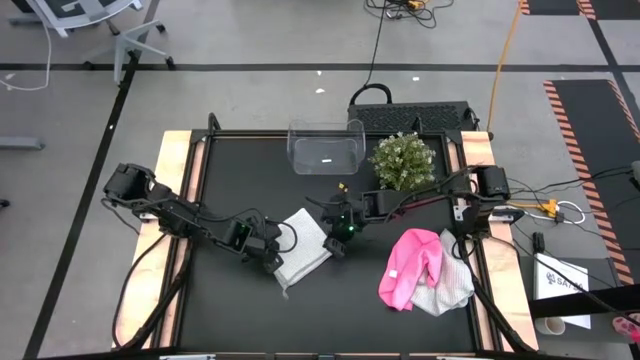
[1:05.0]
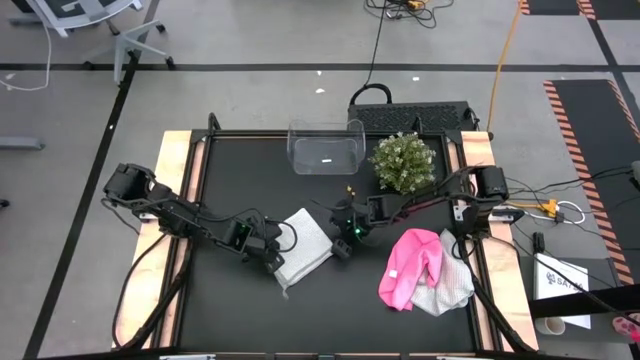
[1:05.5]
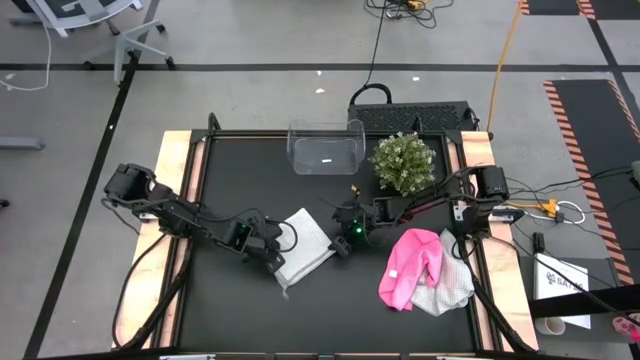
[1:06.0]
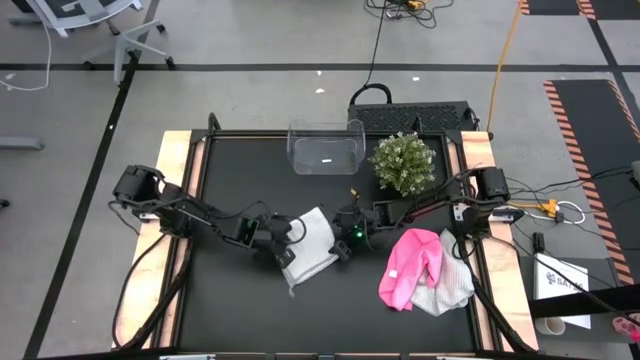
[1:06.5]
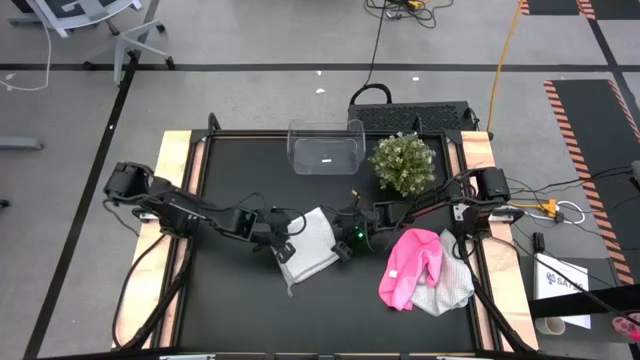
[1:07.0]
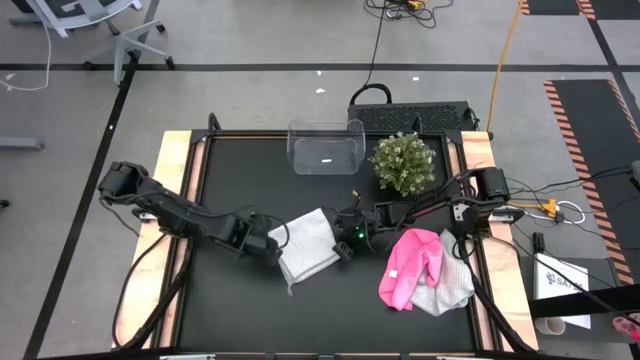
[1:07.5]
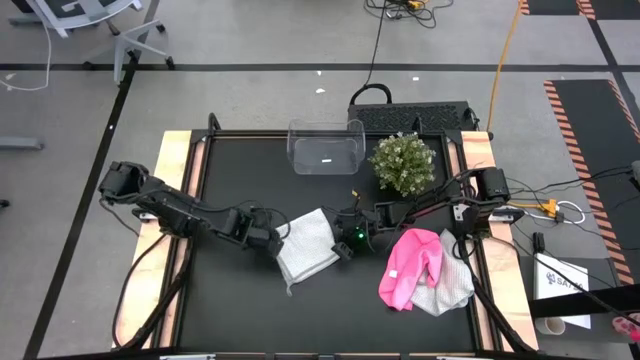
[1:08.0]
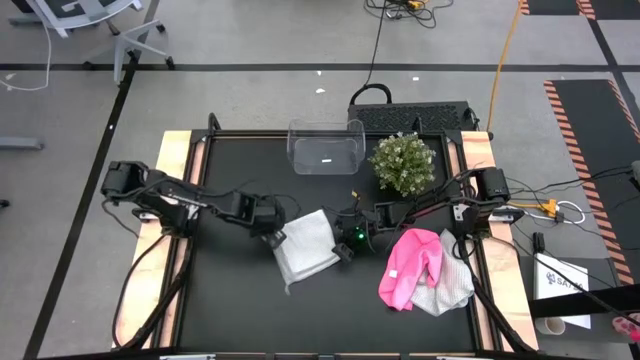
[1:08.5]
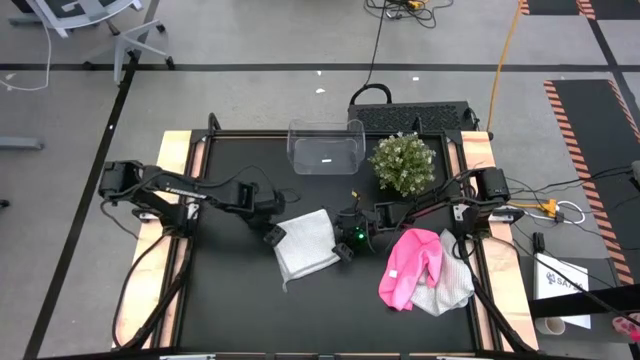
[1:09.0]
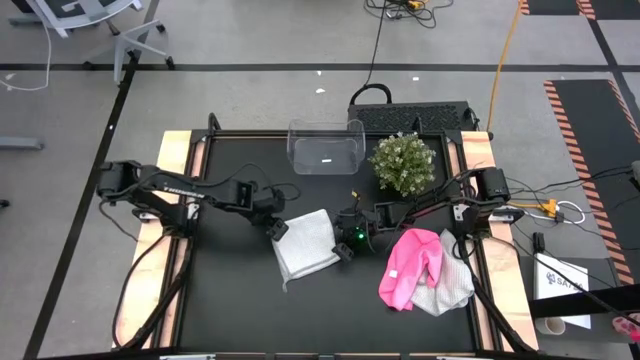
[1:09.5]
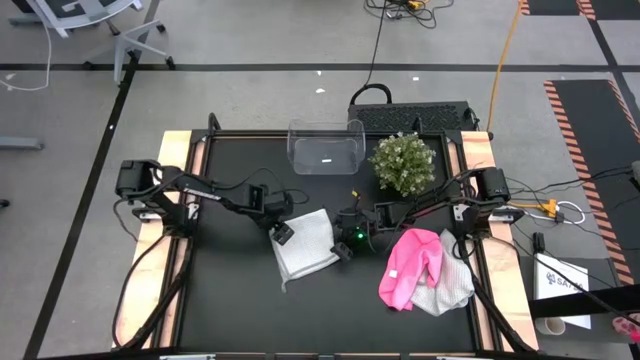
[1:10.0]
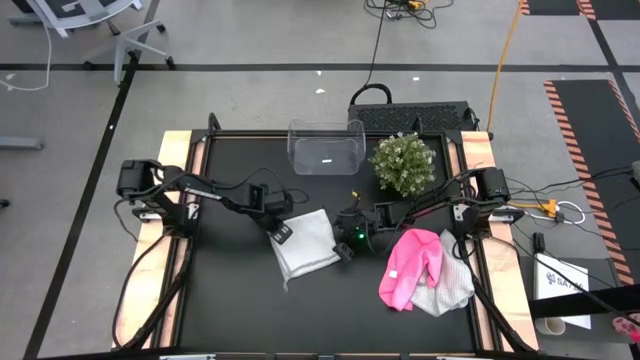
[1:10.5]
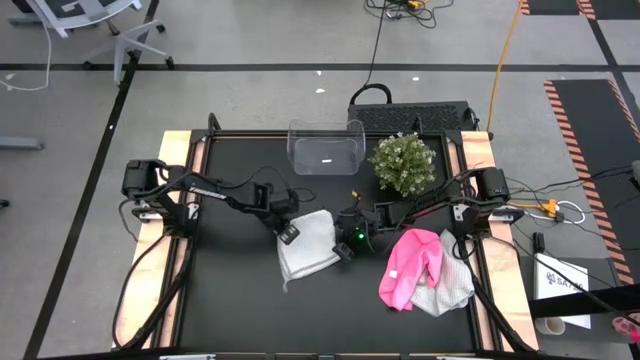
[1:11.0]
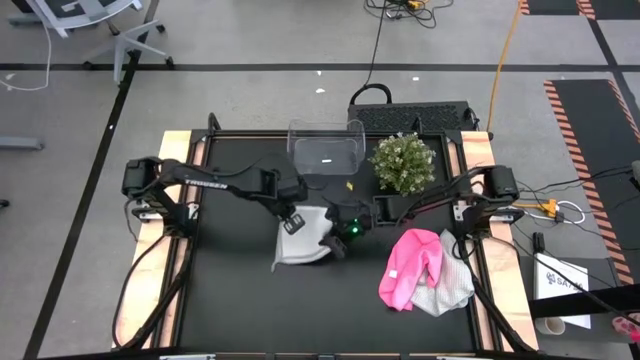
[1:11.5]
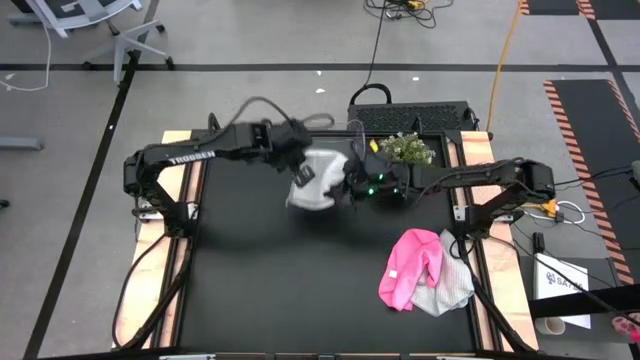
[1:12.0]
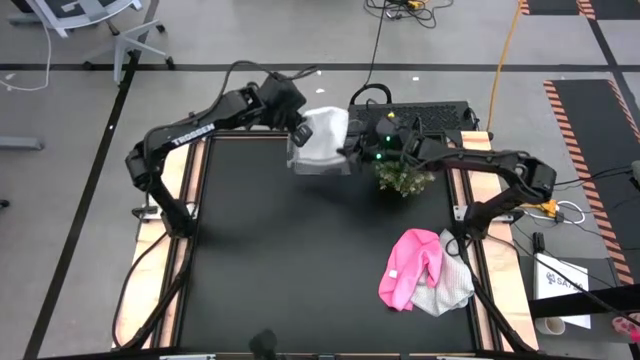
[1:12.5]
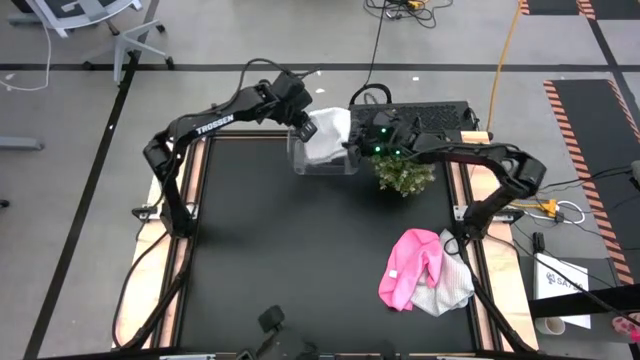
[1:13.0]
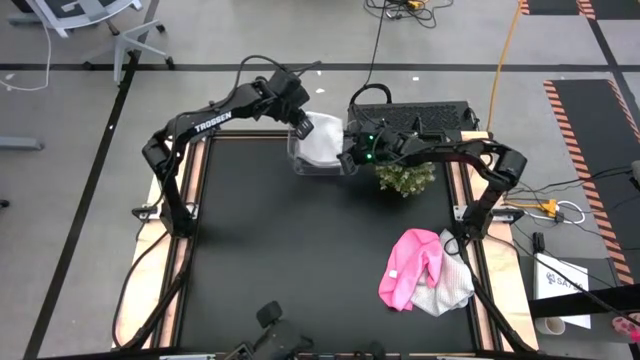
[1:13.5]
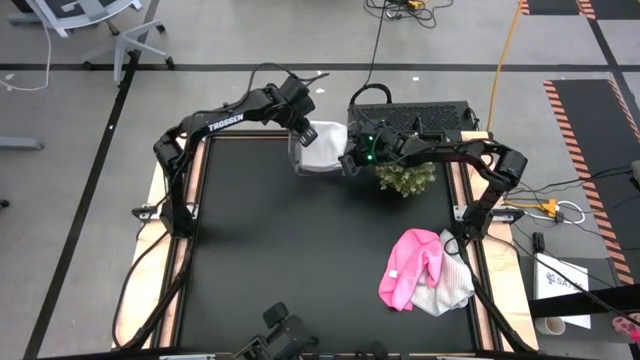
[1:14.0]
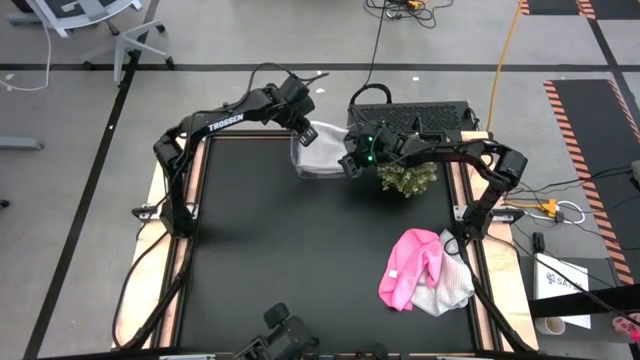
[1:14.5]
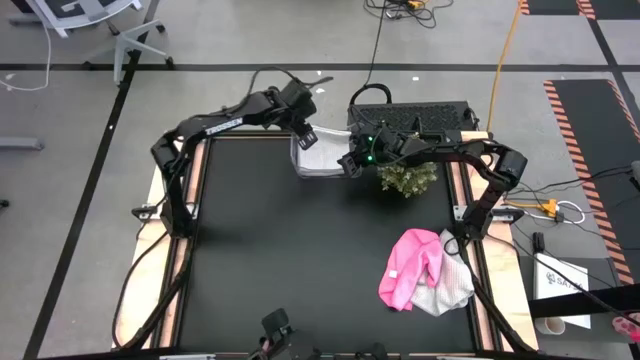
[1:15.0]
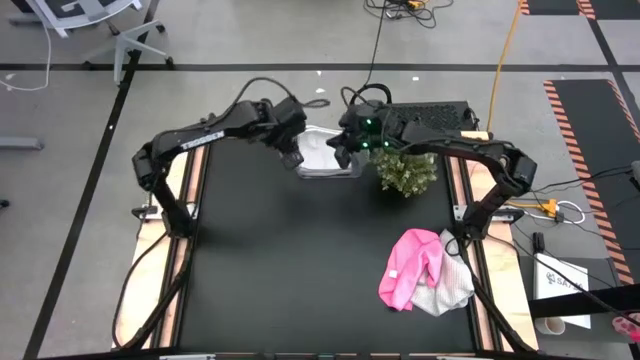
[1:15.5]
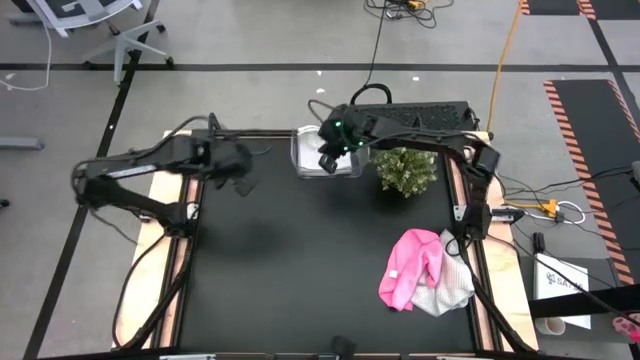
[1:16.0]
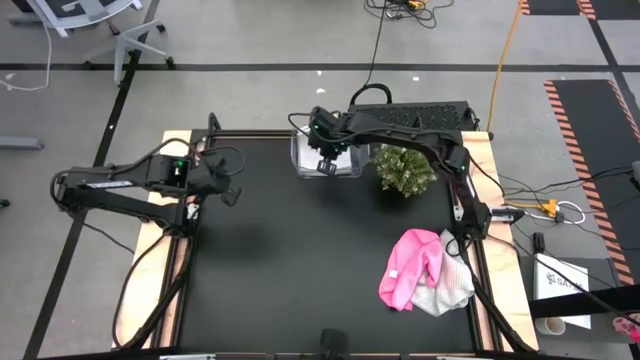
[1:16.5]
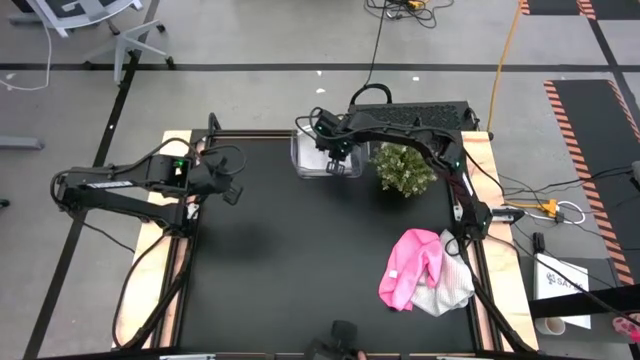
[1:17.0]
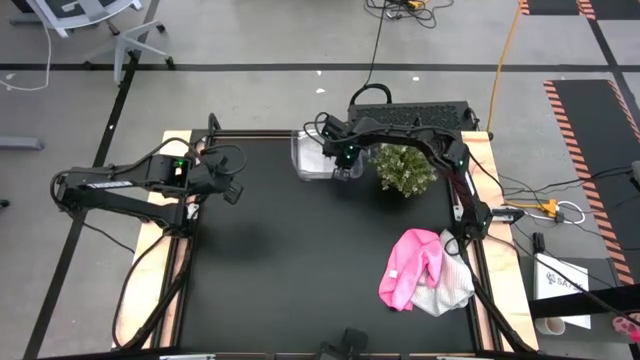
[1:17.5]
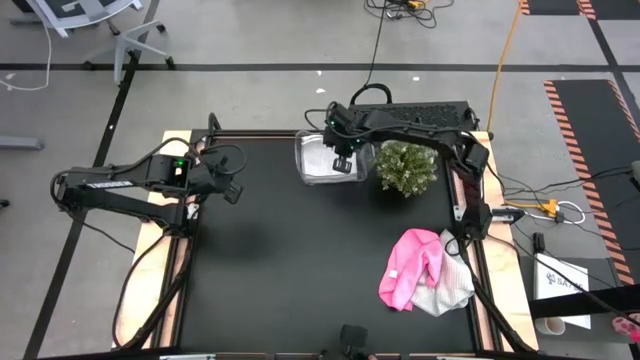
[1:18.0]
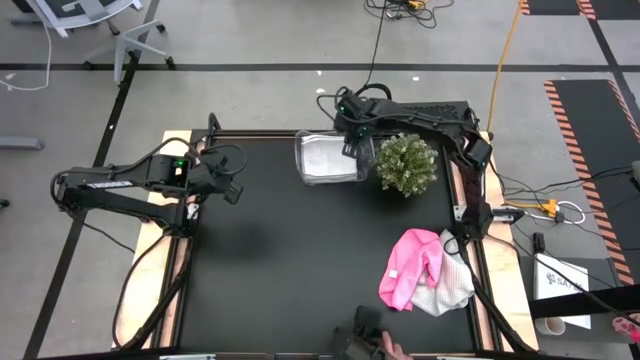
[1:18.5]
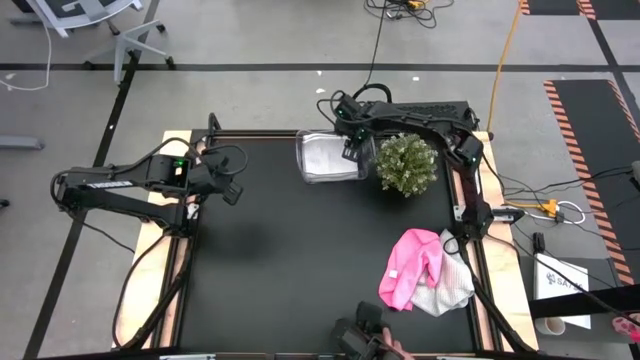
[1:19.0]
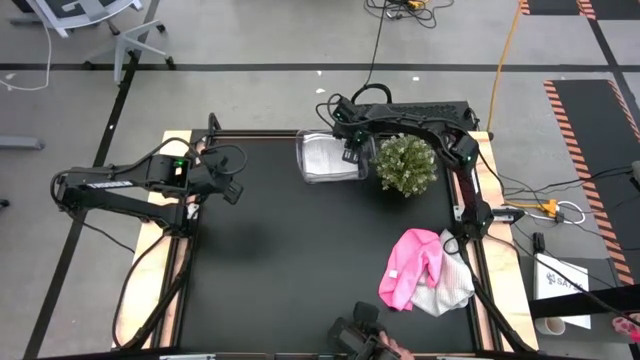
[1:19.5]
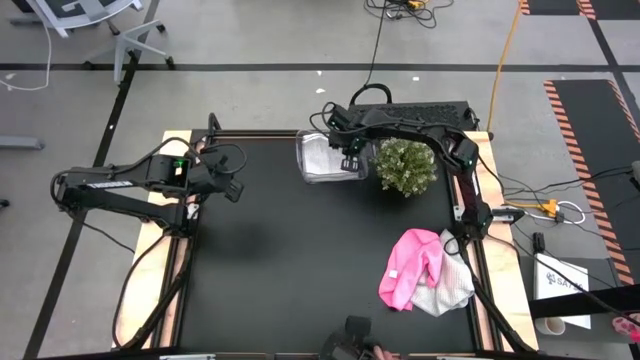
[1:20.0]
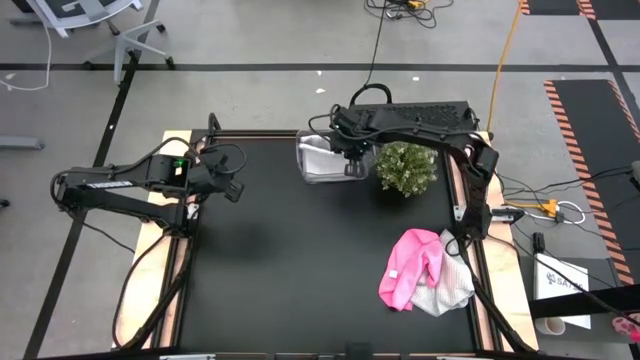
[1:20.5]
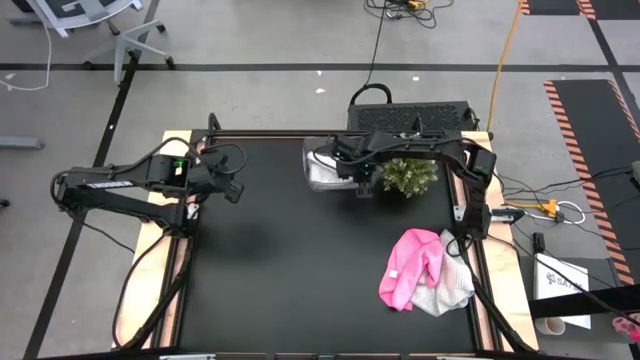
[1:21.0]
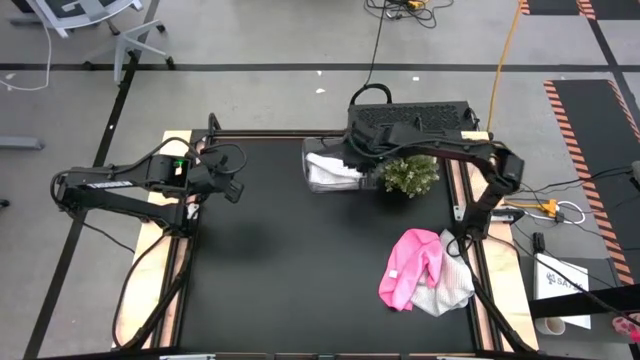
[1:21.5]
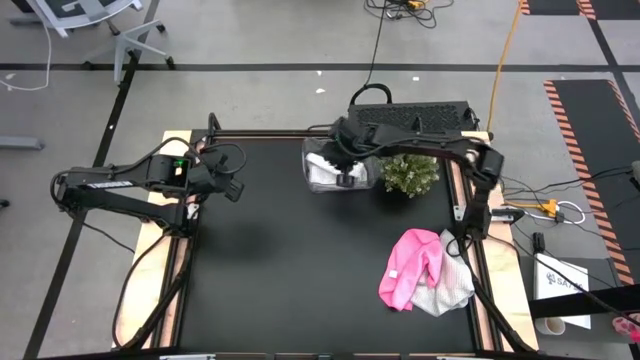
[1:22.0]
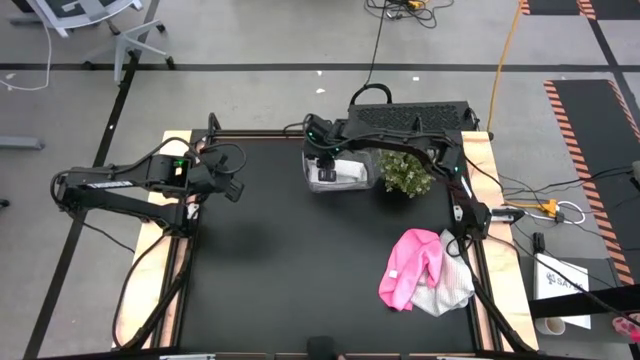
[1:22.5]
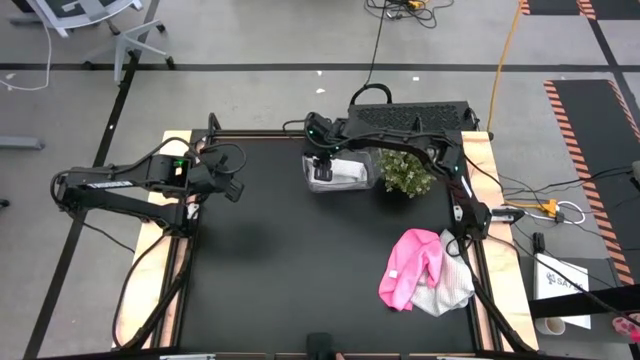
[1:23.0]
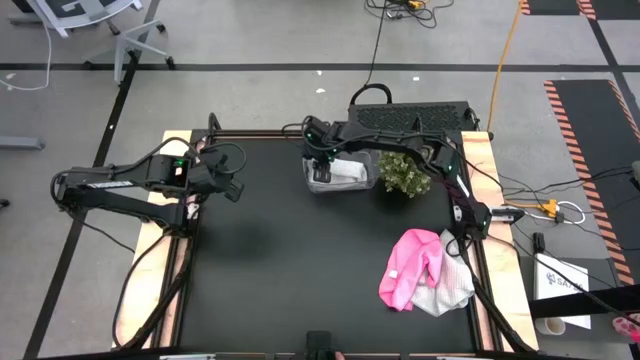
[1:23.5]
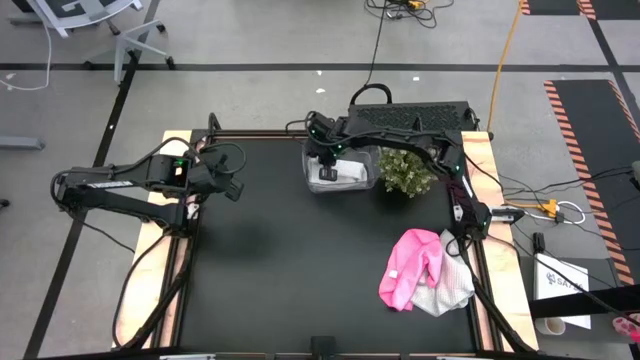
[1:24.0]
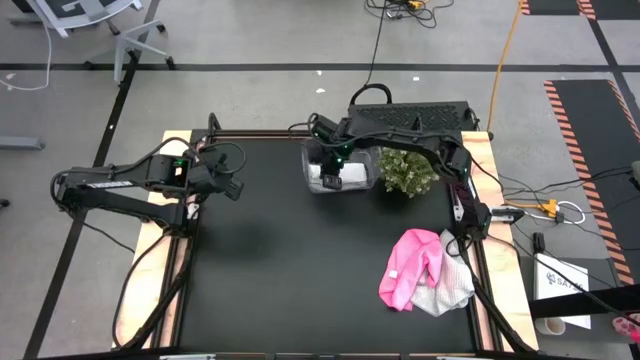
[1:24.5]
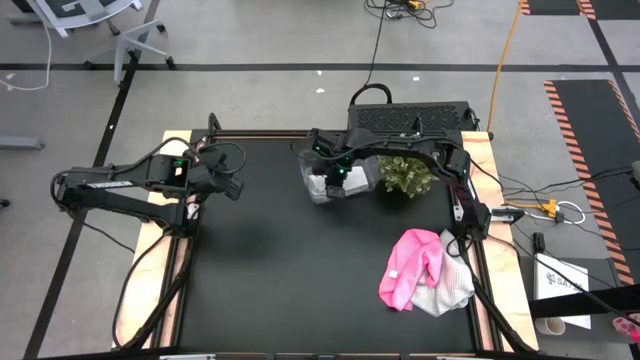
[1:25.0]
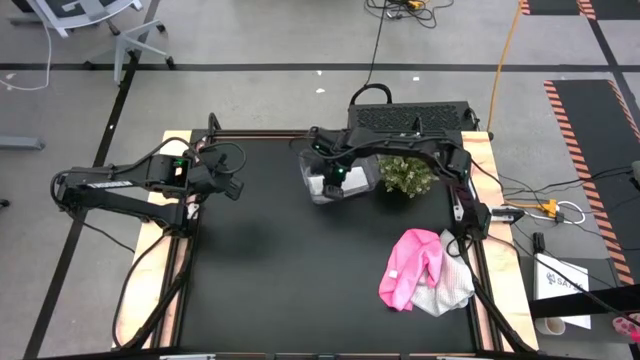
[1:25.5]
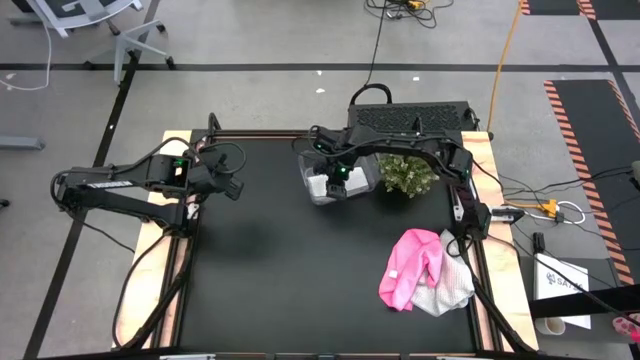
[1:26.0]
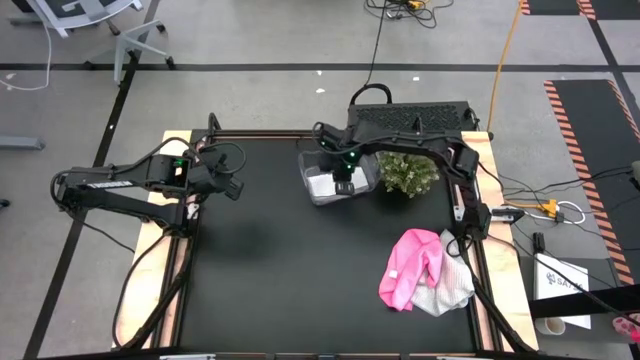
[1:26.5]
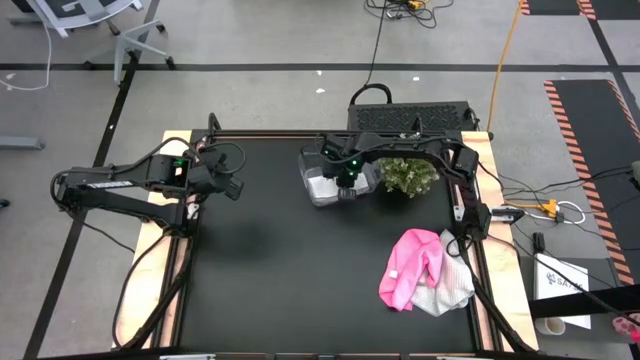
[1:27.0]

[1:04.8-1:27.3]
Task: Fold microfiber towels
Put the folded gray towel into the transparent bin

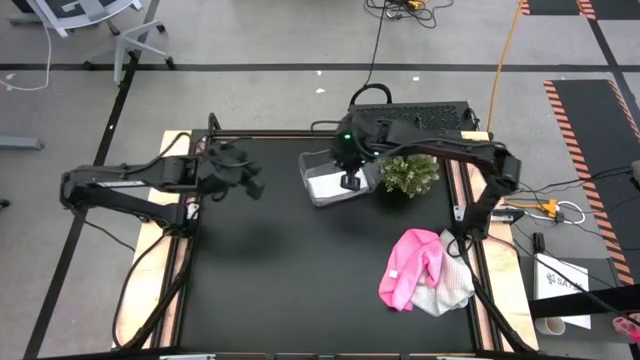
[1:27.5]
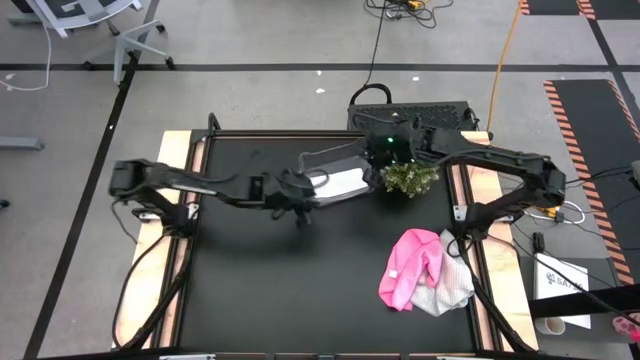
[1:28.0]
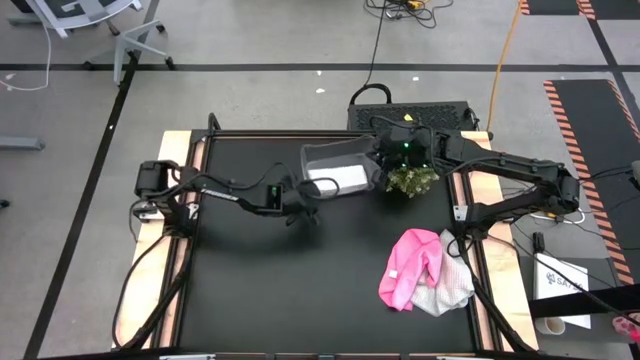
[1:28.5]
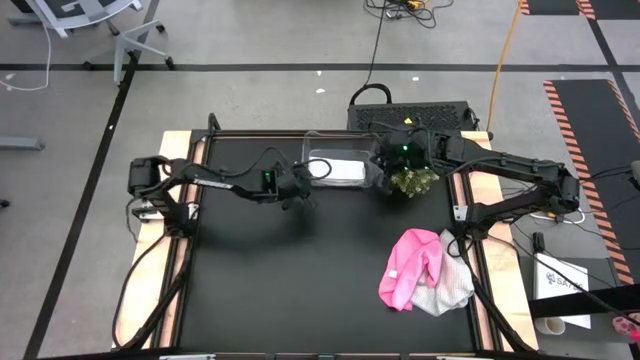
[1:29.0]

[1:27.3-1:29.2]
Adjust the transparent bin
